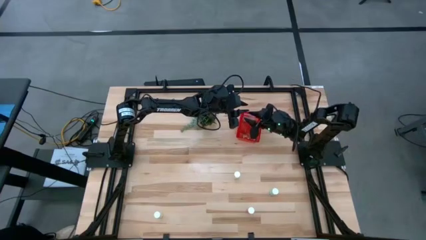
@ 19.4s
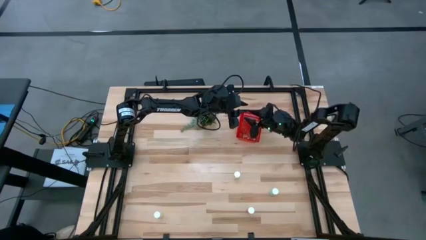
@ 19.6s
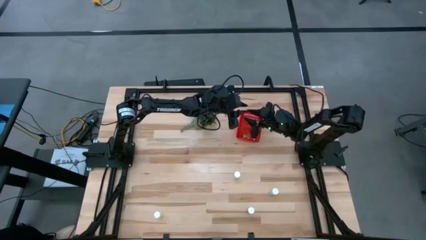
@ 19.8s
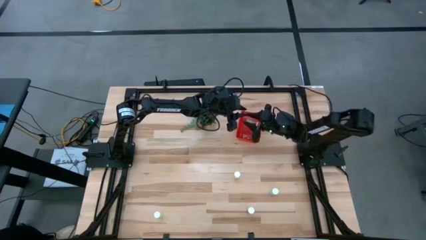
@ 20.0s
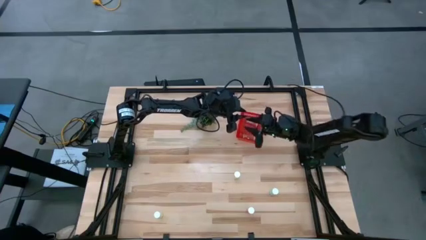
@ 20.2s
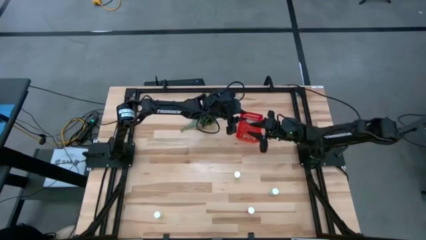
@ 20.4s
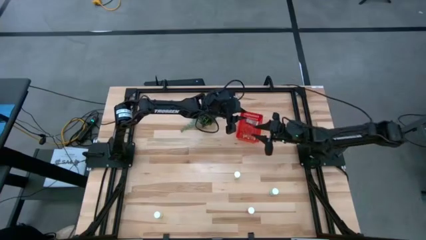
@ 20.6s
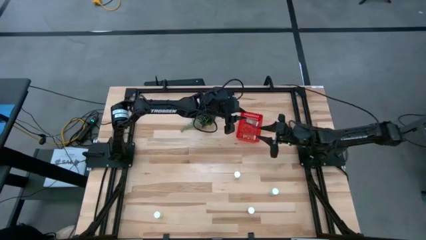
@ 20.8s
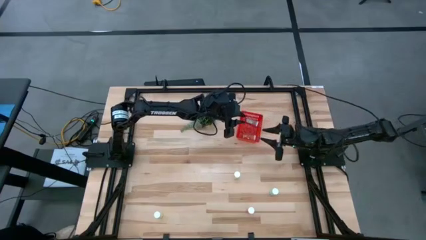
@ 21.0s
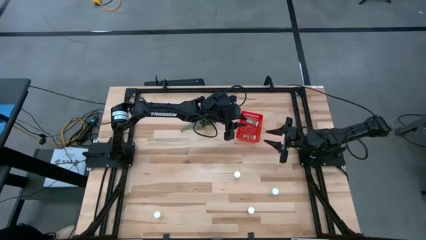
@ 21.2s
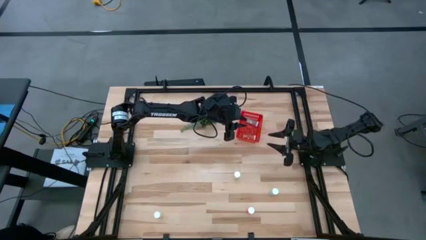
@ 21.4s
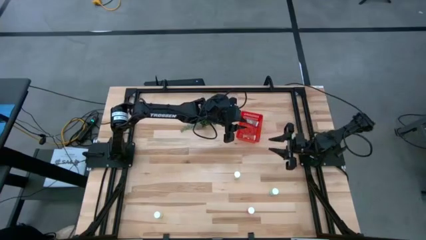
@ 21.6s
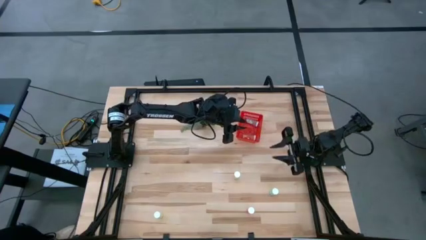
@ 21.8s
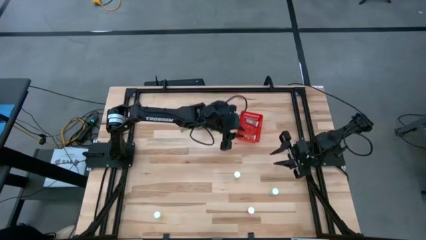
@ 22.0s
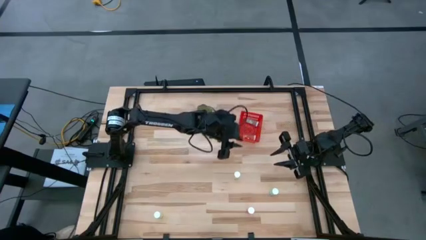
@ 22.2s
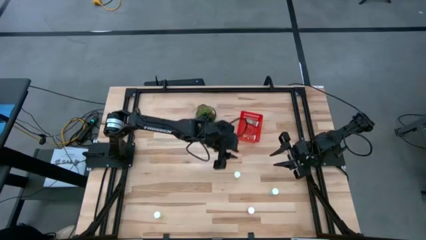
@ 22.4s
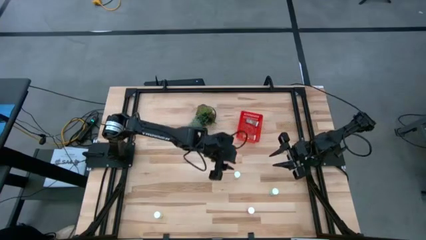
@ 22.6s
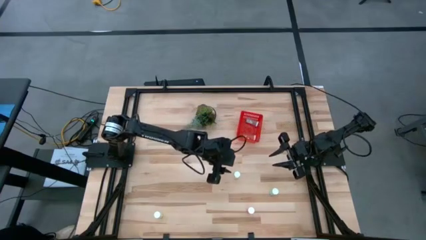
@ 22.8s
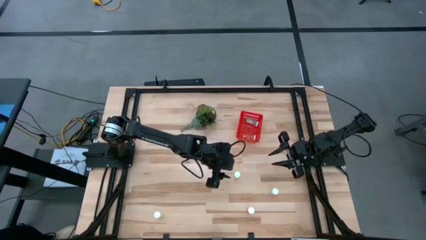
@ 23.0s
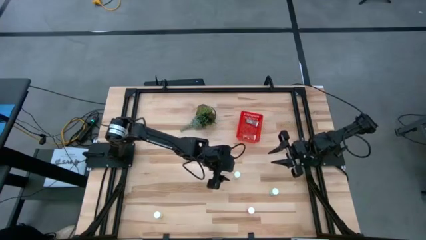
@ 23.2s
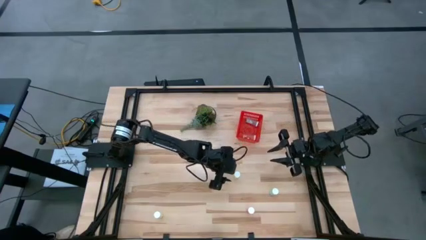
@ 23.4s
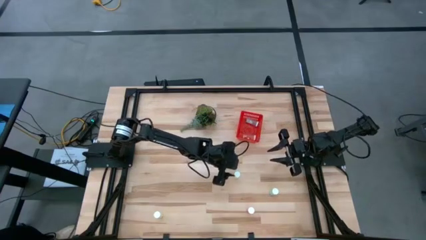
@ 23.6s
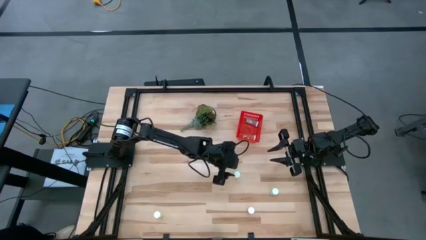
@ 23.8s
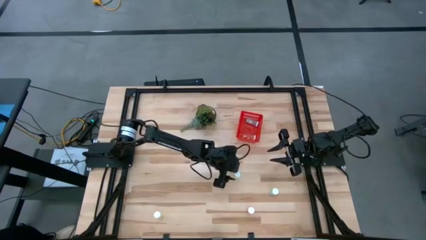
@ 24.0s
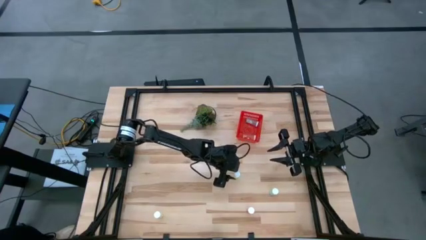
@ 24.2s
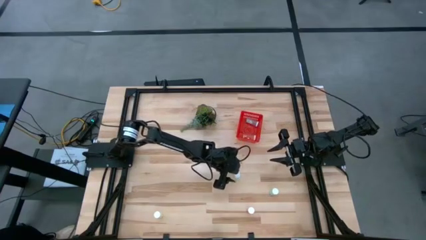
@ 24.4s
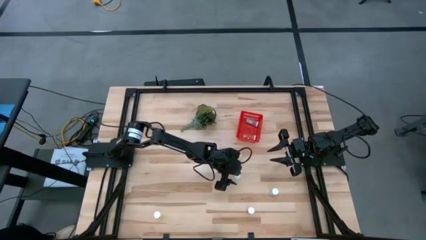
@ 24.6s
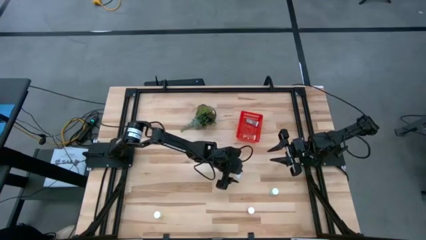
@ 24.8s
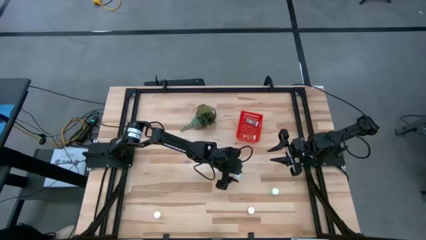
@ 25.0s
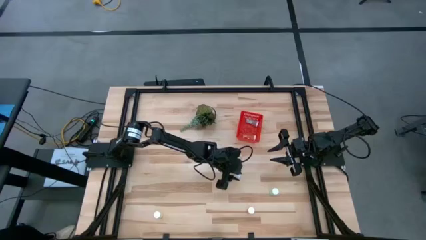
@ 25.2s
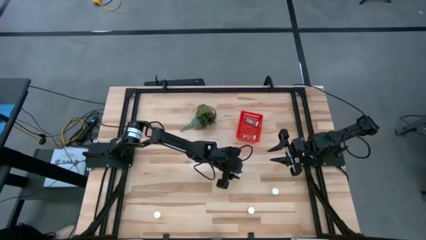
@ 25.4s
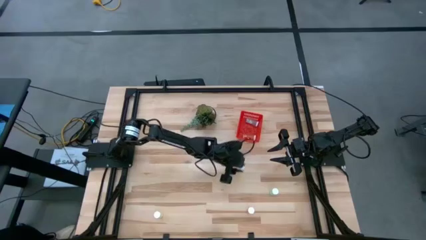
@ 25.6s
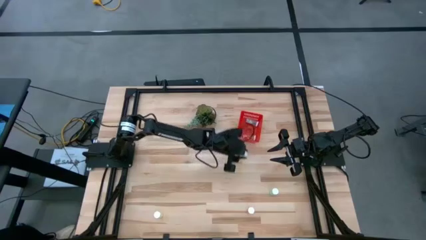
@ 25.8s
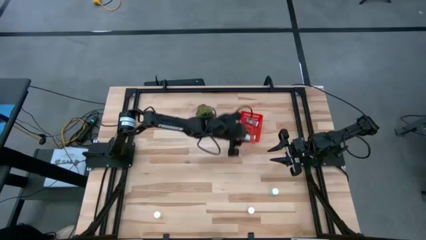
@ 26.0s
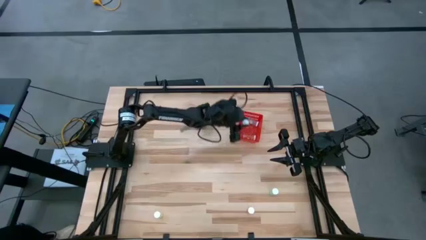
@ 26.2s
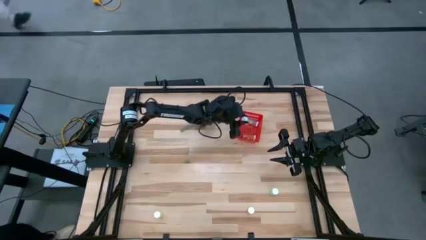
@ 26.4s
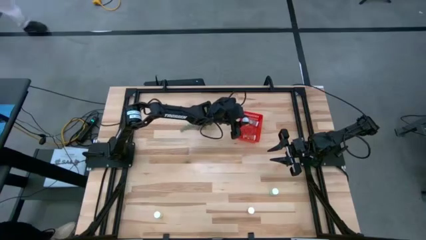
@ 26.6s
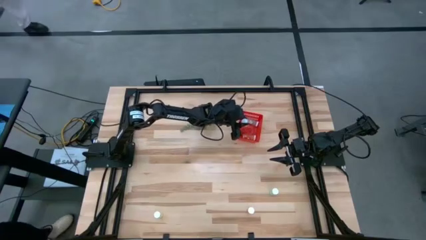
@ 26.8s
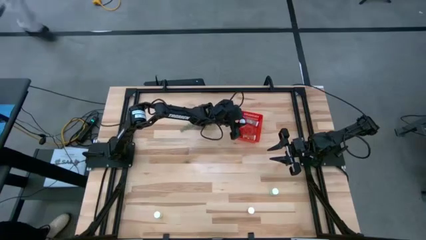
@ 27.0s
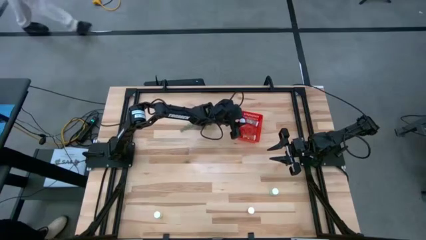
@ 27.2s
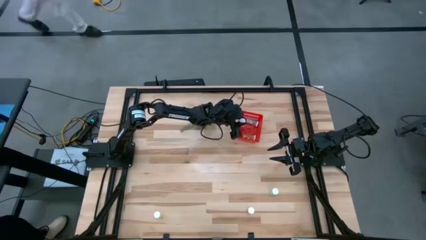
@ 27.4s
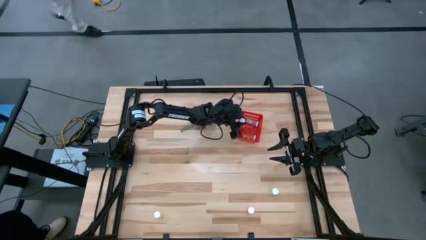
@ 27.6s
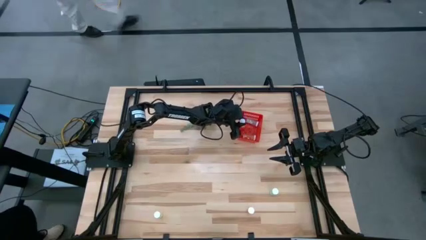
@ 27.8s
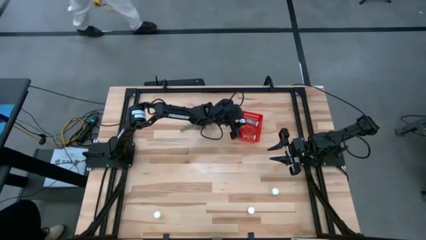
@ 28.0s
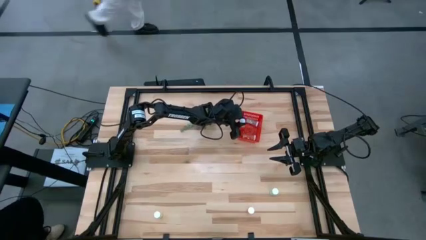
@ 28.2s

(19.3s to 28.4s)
Task: Pick and place pill bottles into a basket
Put the top yellow pill bottle into the red basket

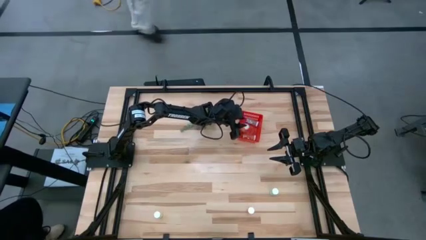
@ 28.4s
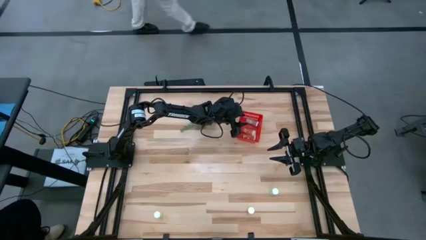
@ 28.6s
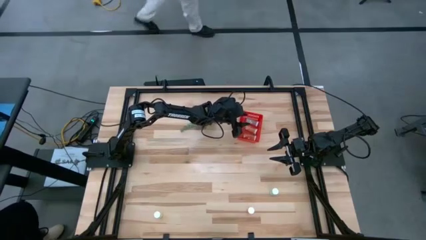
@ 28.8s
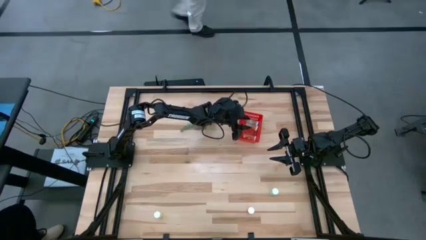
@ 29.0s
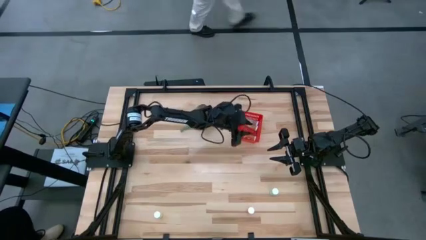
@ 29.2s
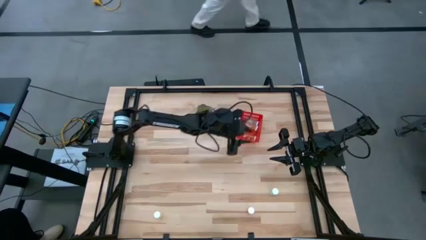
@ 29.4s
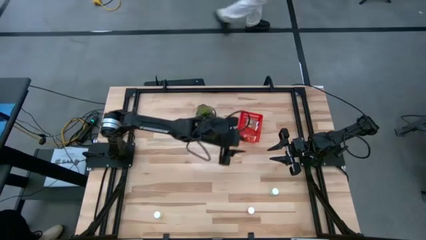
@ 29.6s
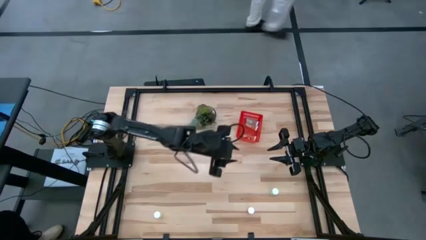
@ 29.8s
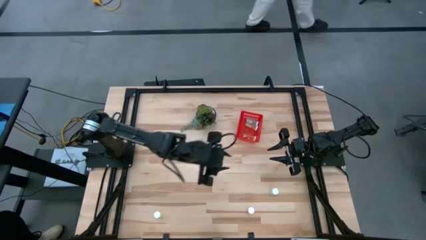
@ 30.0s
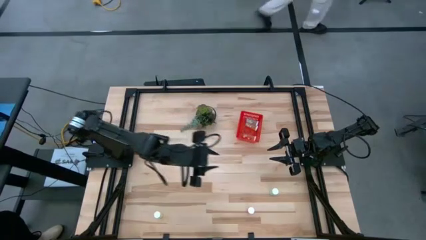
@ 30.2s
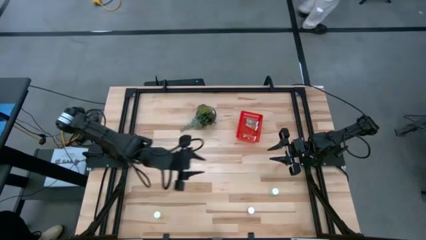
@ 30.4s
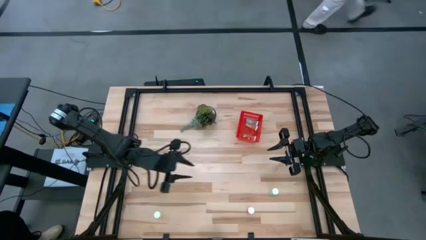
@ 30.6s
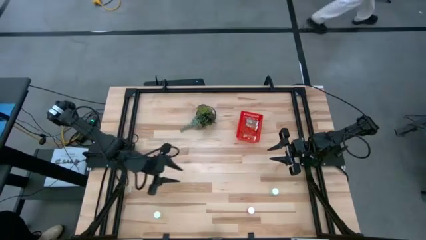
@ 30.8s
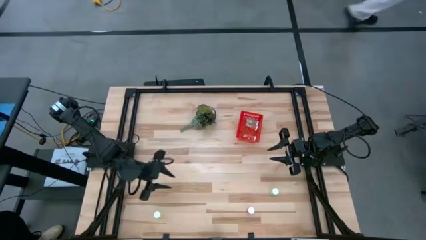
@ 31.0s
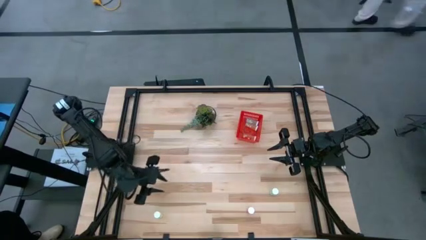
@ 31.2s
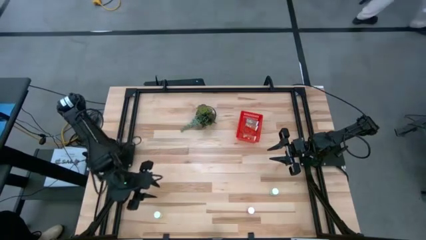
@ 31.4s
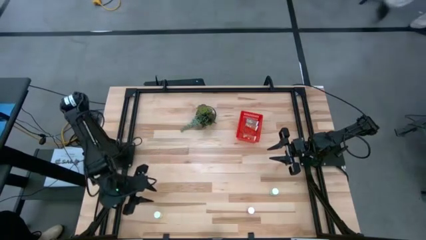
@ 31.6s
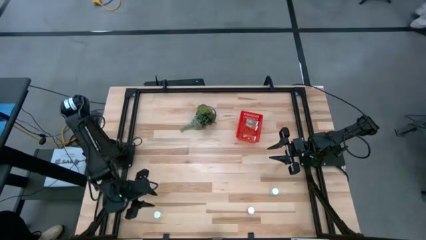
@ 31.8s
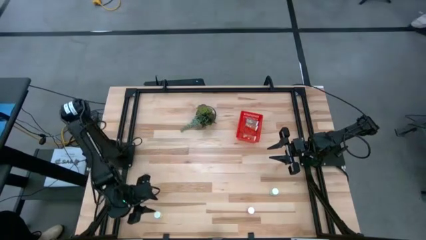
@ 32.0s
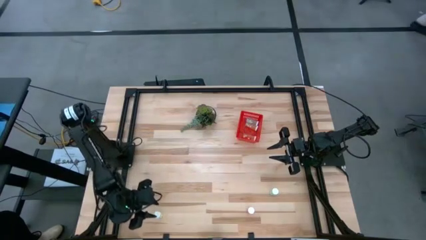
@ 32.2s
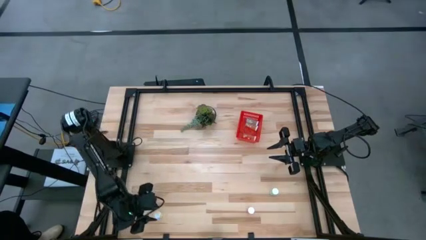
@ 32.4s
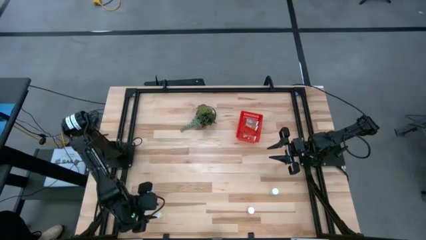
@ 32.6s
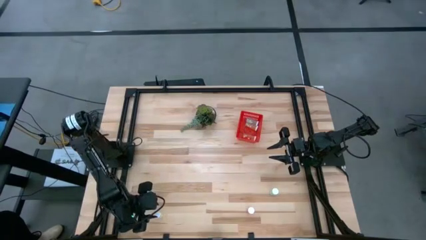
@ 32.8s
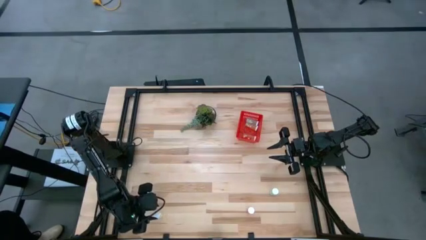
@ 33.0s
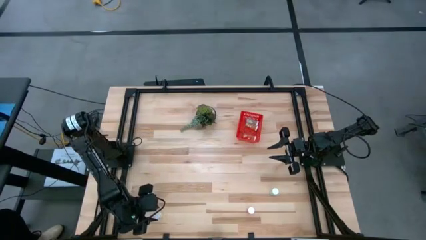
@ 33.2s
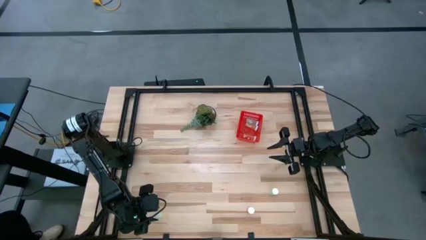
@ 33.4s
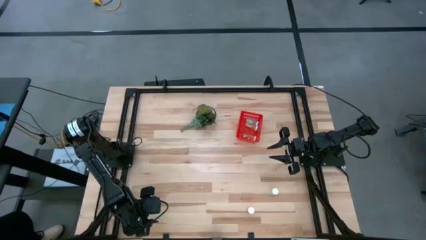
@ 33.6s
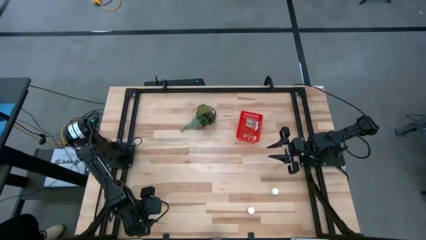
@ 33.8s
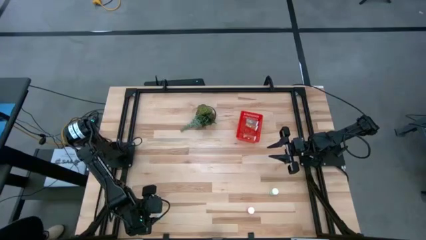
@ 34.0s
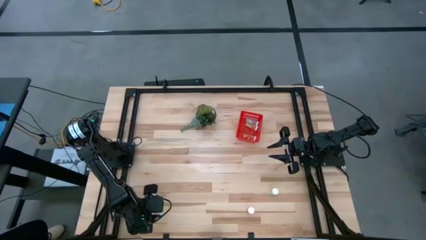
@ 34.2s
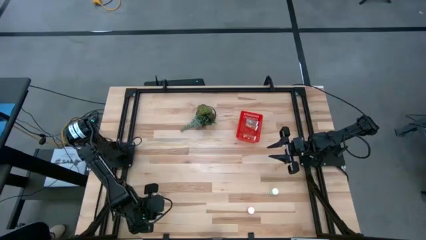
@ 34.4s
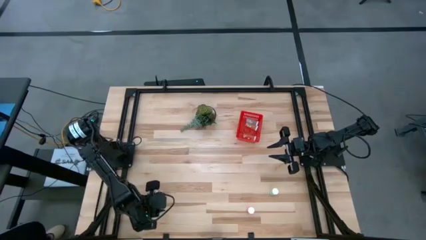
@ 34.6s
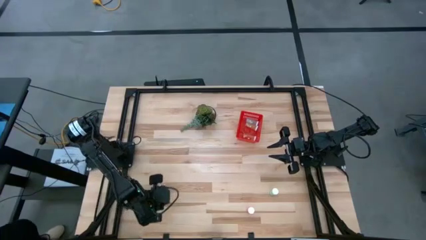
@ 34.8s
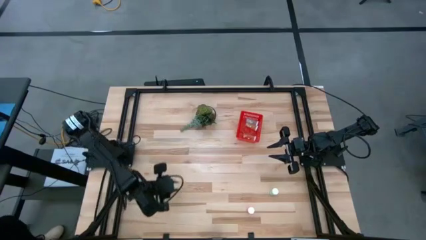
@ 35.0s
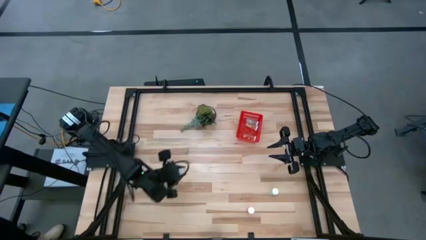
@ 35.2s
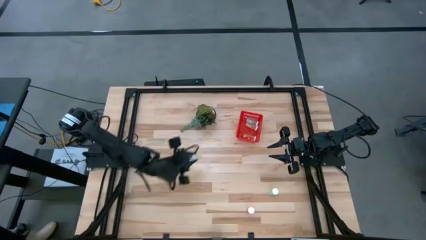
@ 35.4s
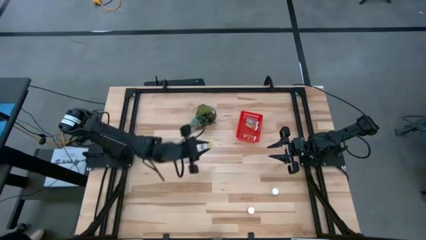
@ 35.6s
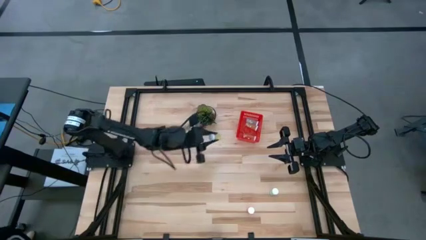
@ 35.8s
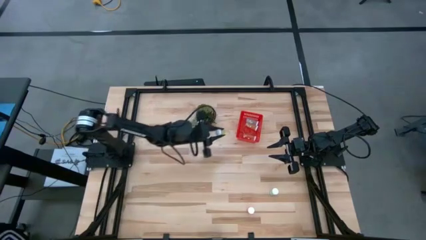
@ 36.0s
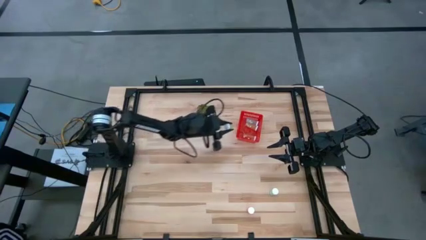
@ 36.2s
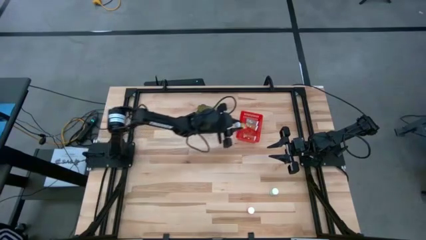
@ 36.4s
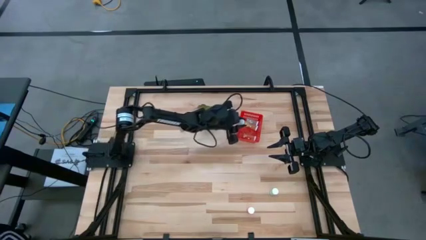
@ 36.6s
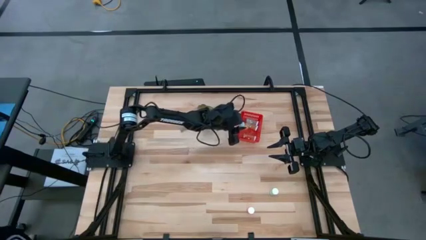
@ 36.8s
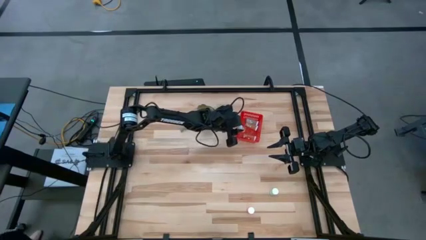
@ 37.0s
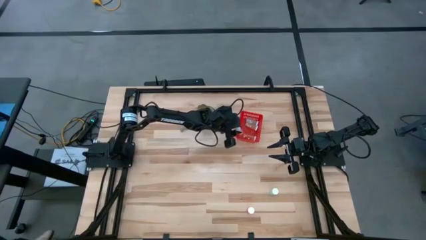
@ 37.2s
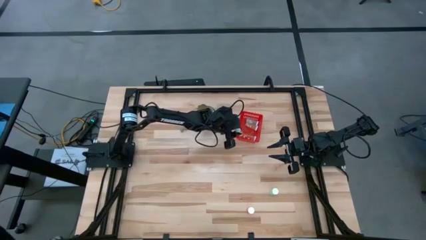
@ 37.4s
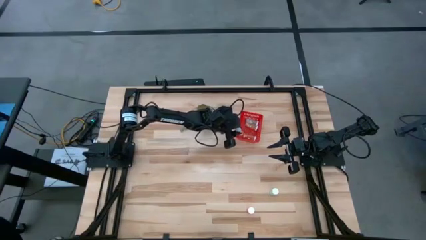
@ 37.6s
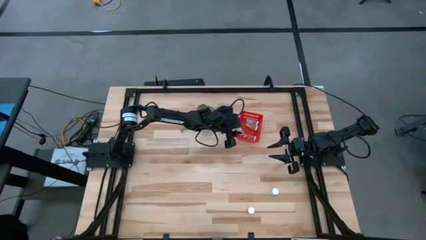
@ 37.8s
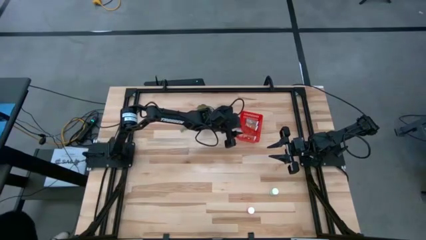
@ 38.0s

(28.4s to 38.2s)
Put the yellow pill bottle into the red basket
